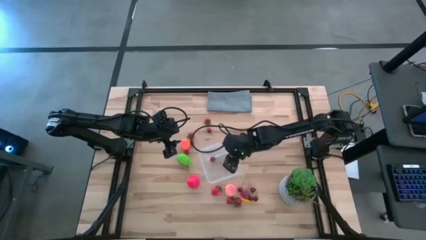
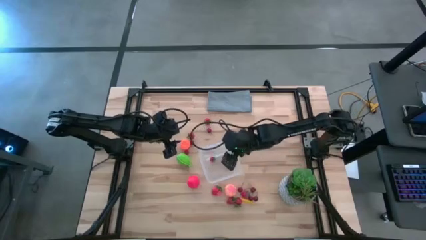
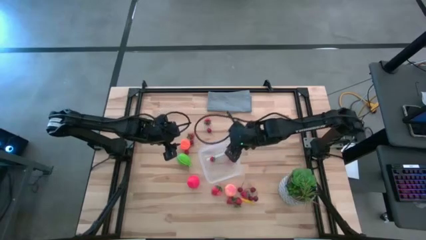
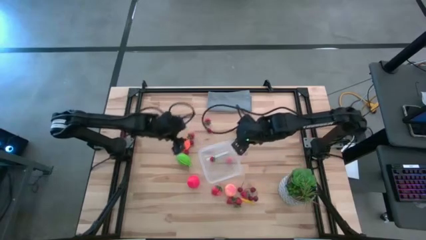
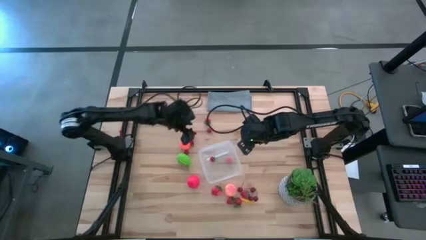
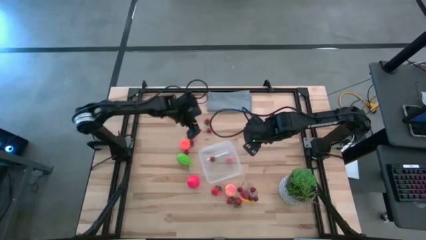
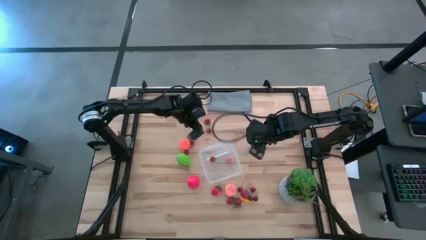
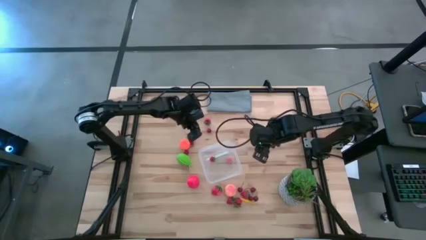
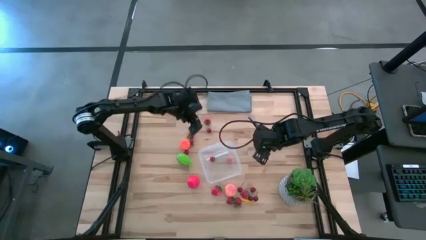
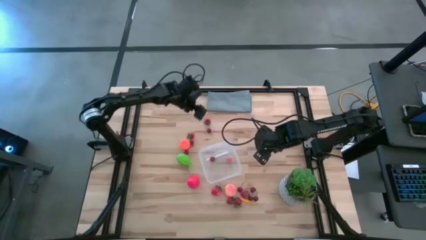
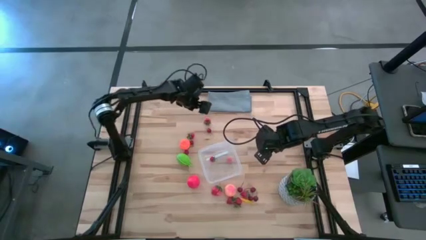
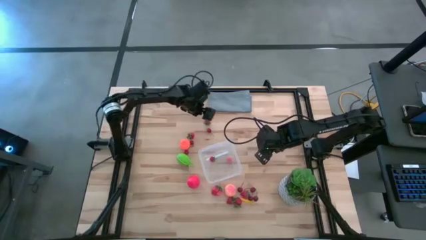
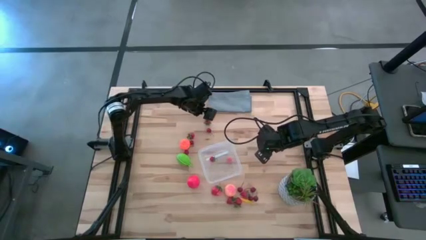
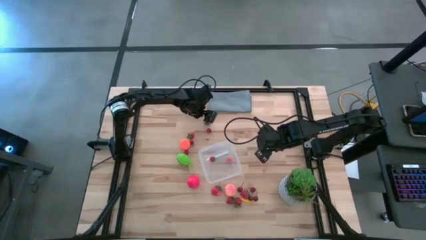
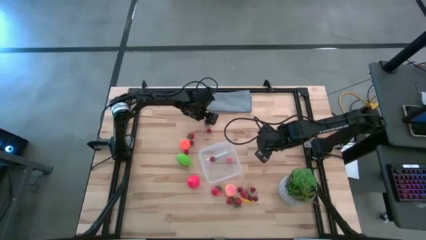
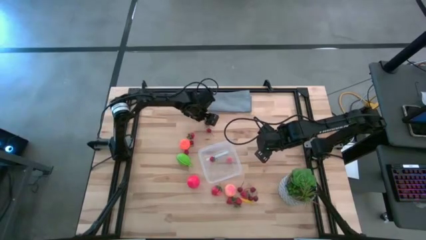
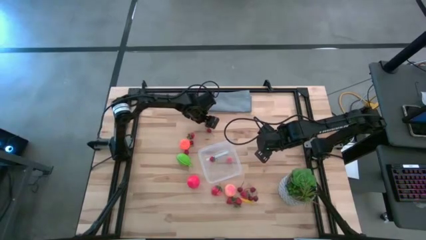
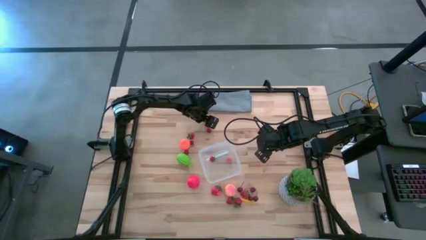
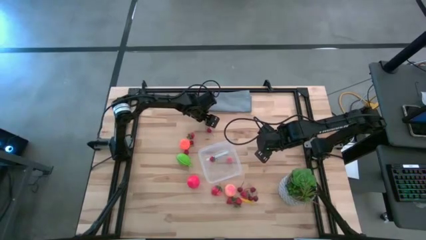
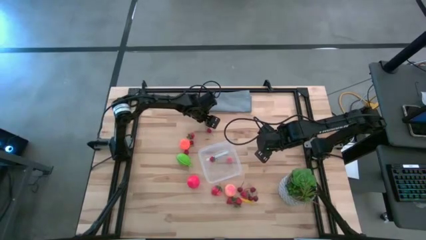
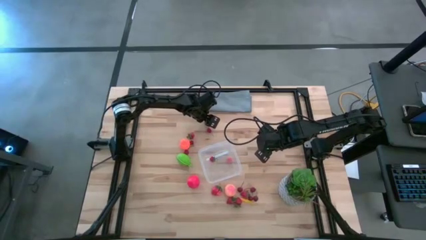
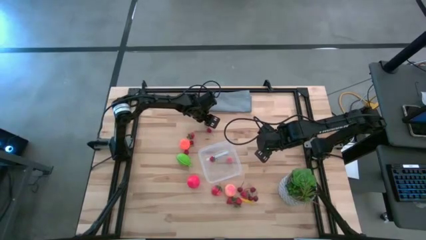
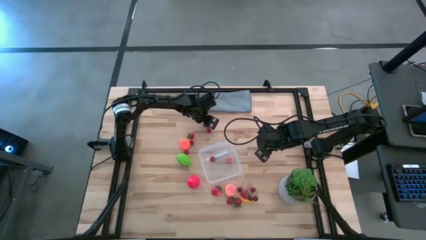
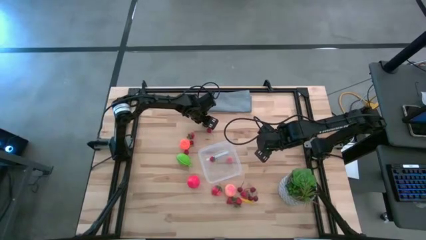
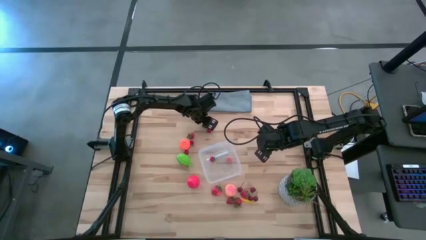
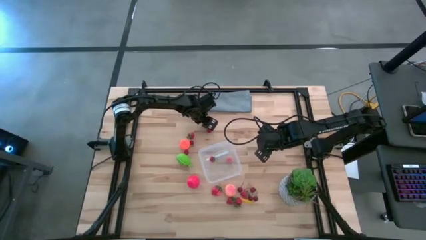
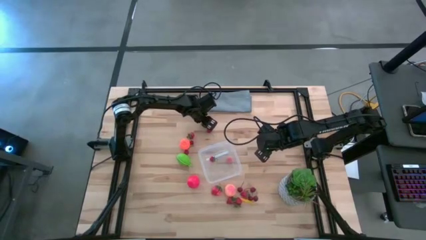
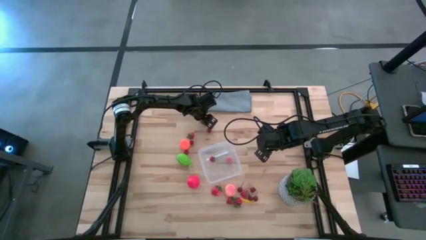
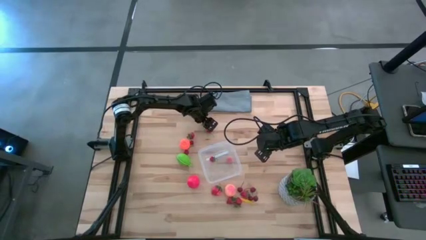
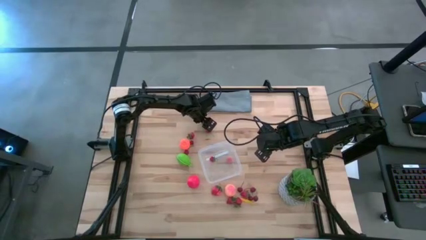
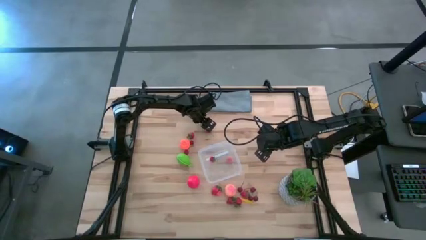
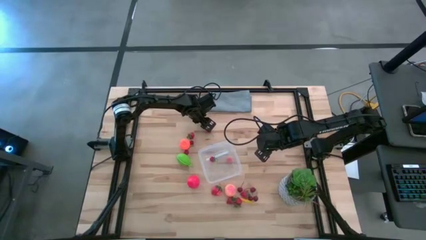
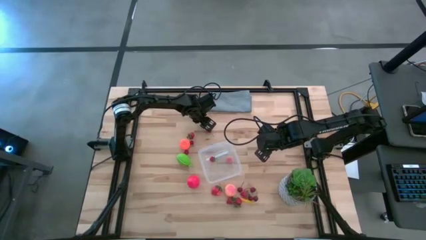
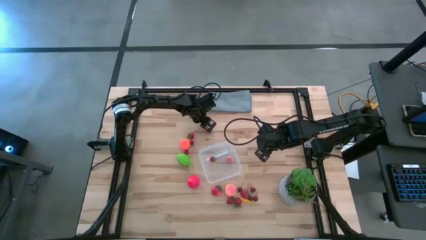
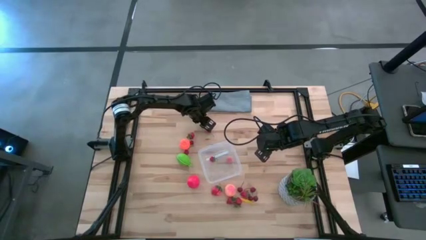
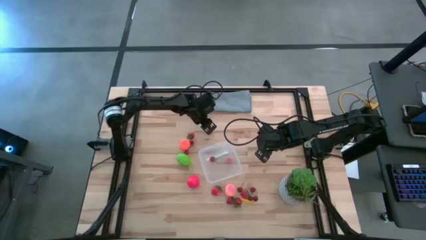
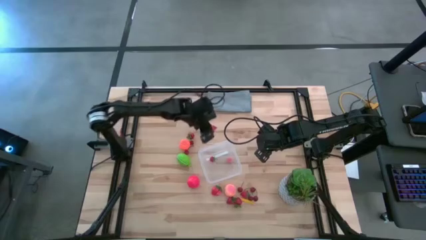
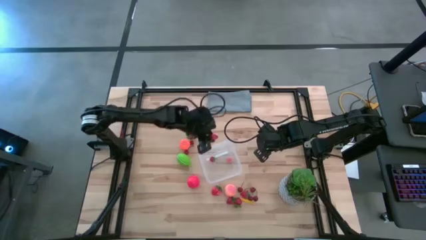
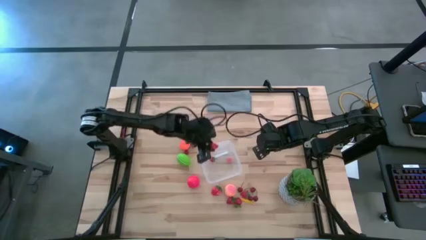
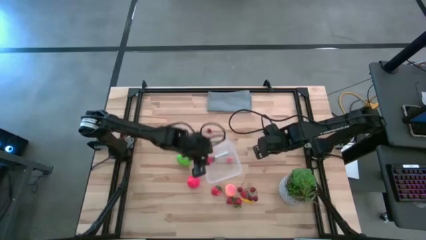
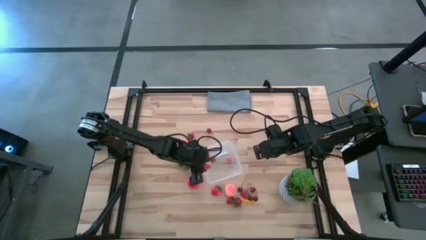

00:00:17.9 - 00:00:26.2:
Task: Pick and placing Produce into tupperware
Put the red strawberry into the transparent container

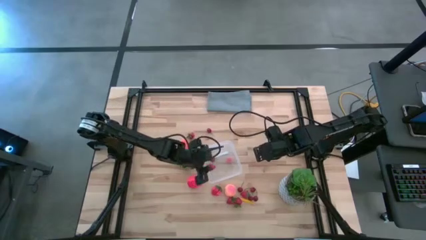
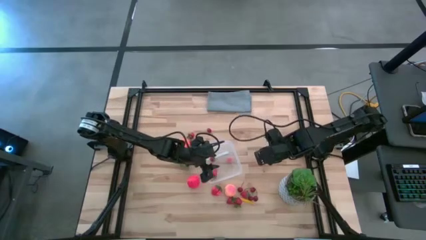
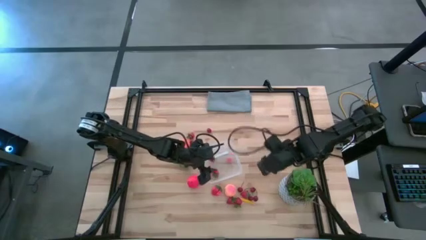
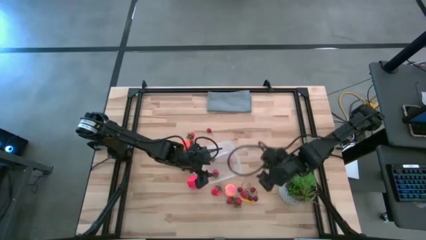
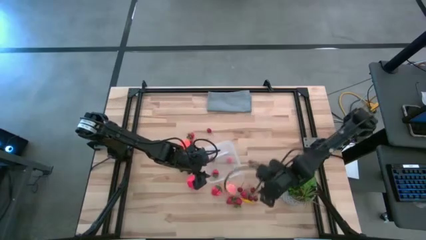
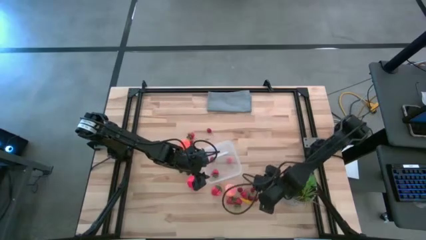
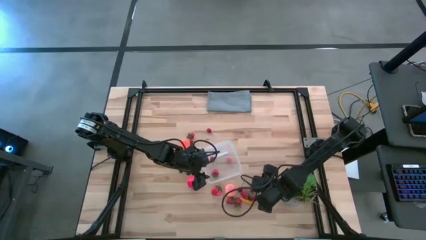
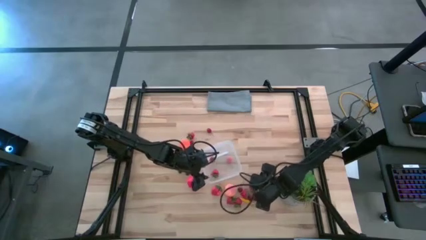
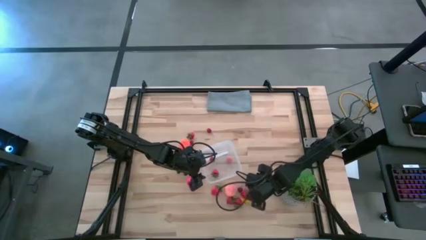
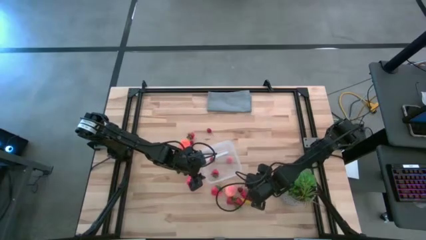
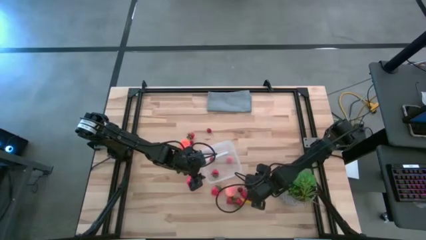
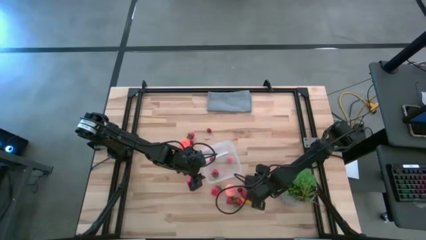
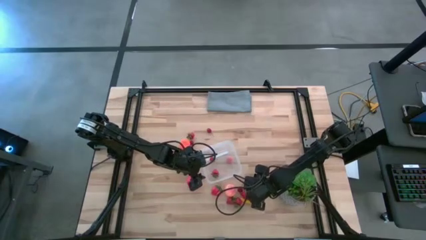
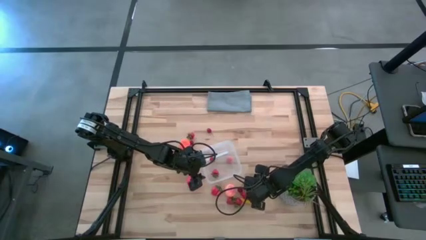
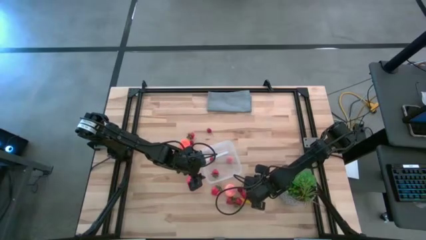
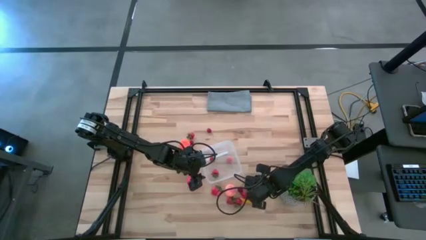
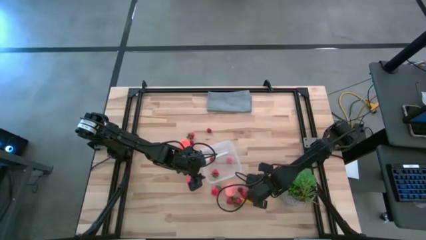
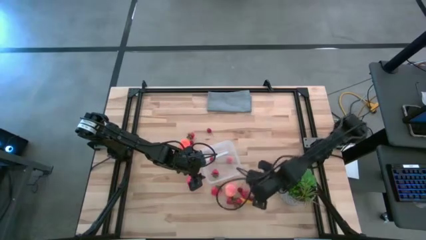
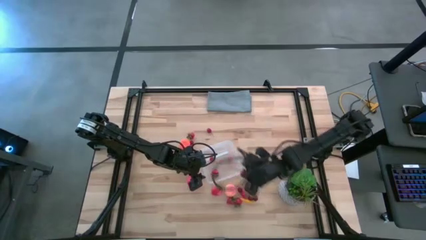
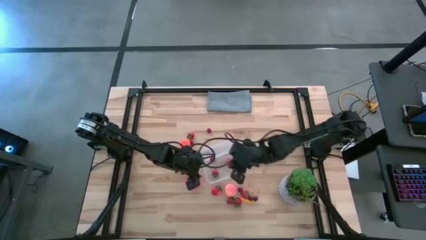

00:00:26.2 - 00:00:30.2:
Put the red cherry into the transparent container

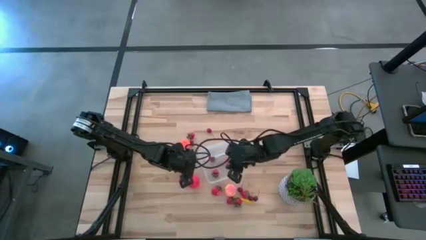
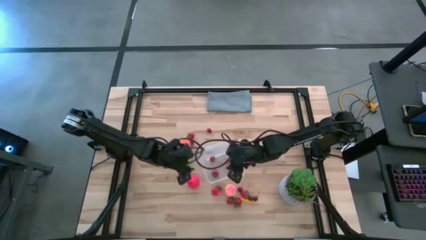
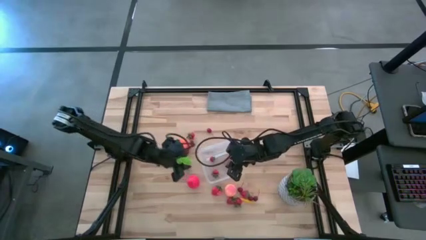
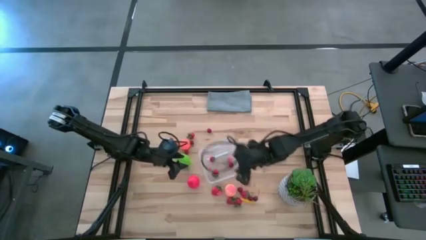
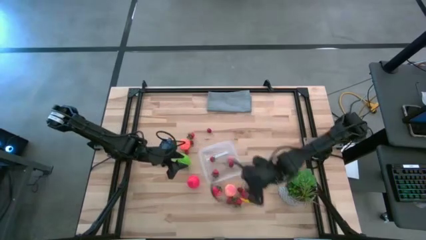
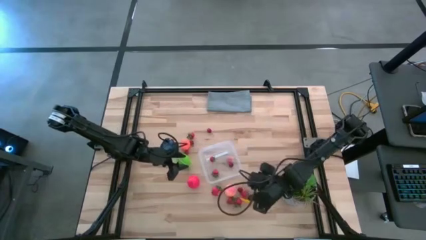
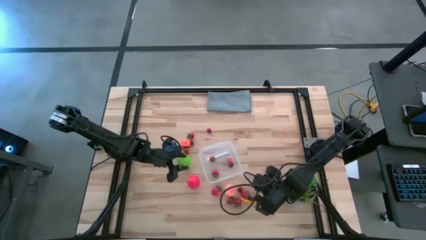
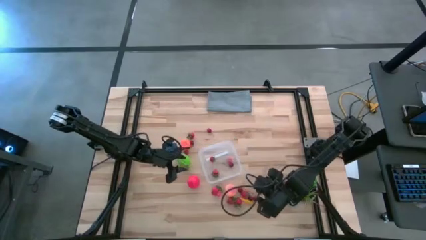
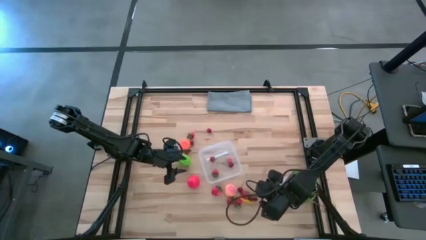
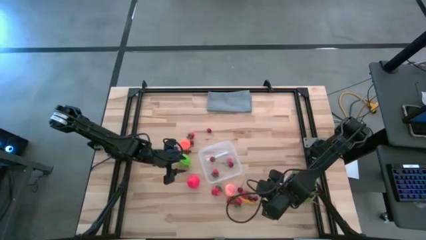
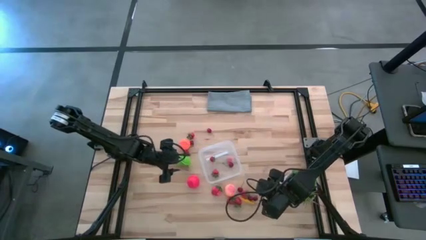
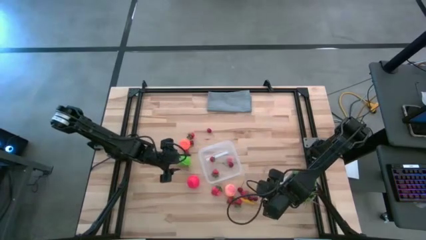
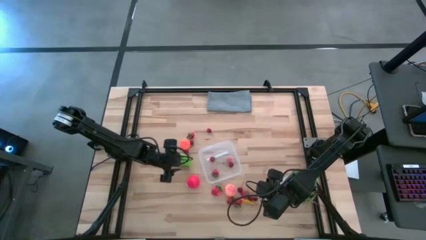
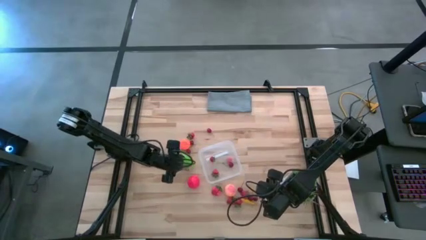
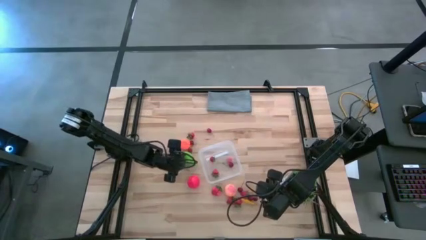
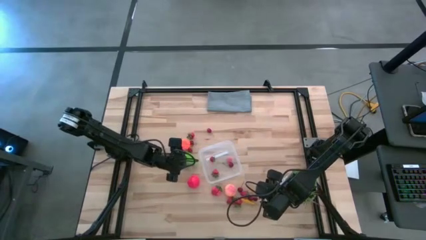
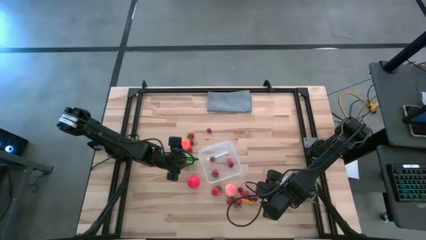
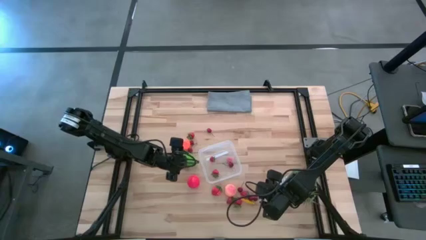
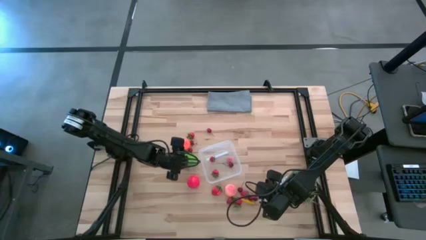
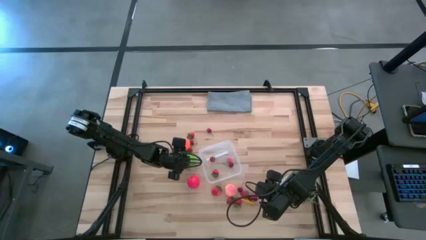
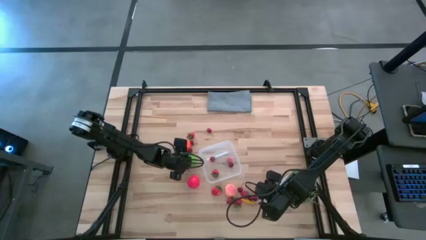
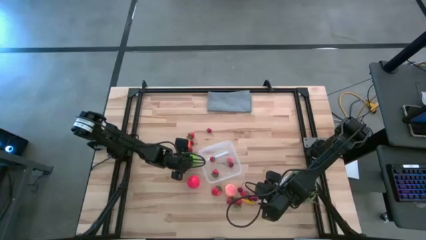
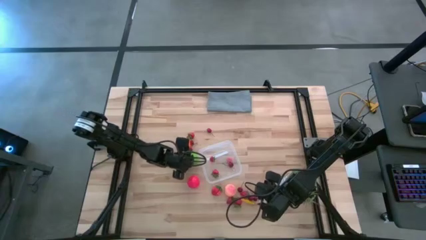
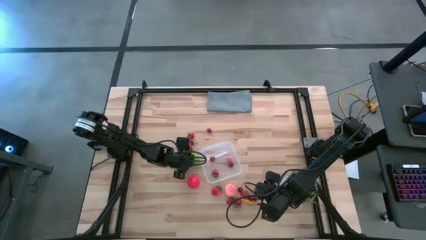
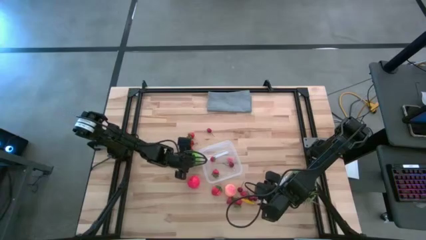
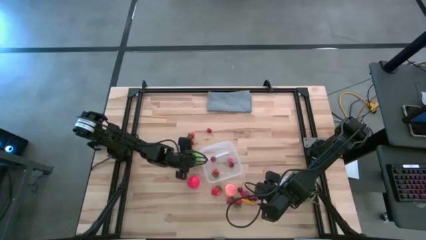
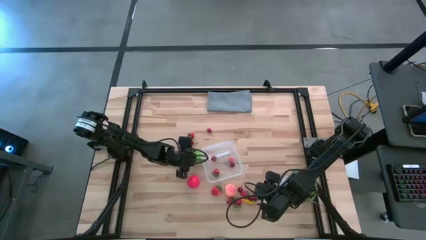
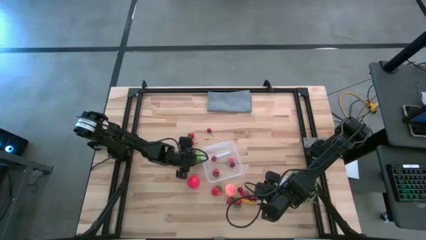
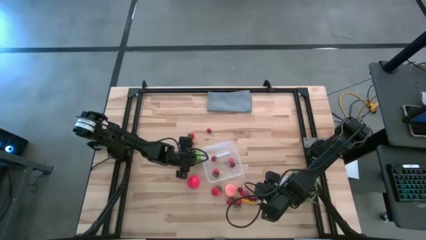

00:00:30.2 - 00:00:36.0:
Put the green melon into the transparent container
